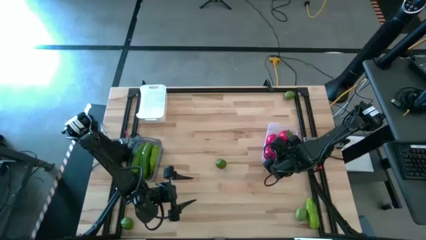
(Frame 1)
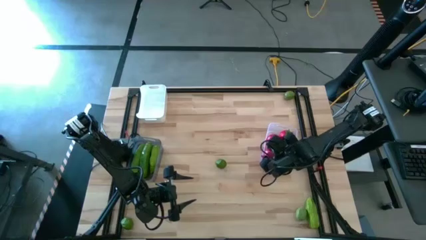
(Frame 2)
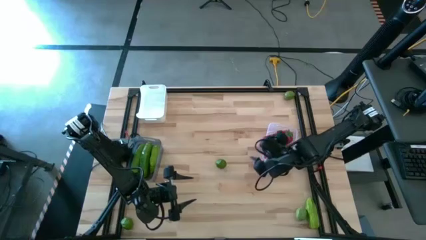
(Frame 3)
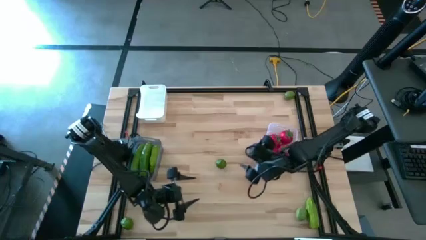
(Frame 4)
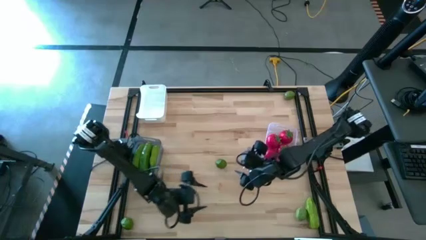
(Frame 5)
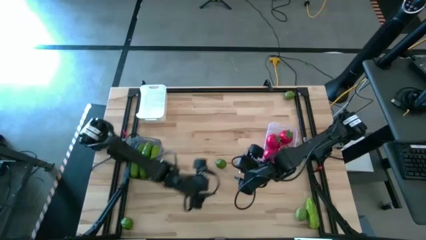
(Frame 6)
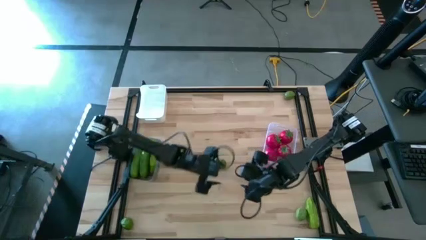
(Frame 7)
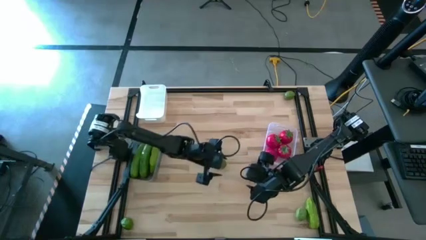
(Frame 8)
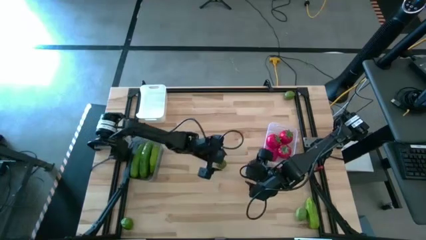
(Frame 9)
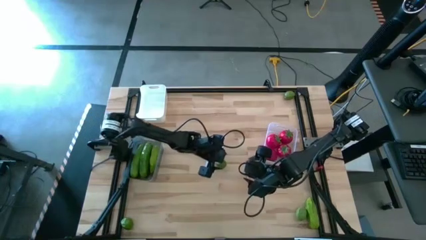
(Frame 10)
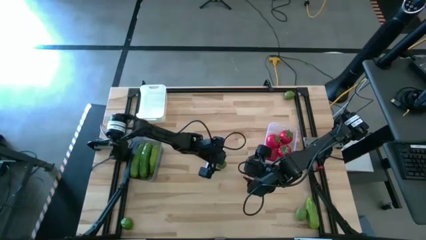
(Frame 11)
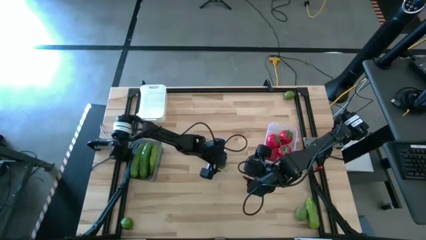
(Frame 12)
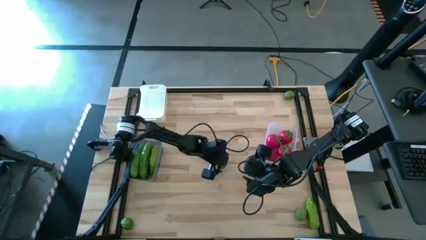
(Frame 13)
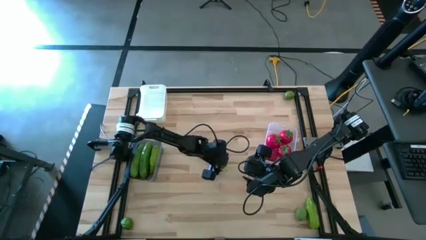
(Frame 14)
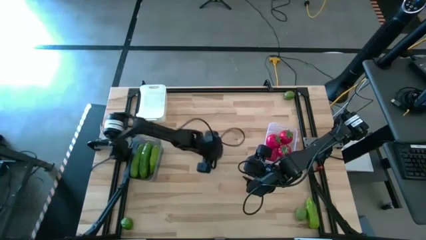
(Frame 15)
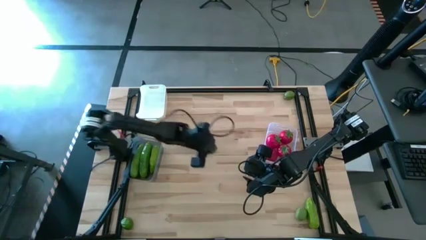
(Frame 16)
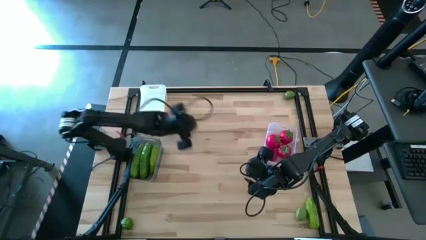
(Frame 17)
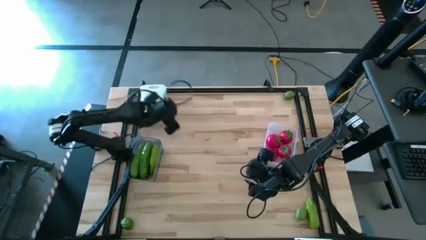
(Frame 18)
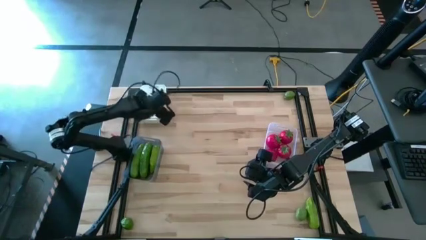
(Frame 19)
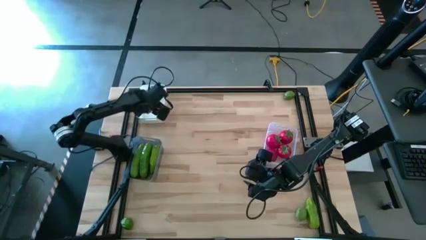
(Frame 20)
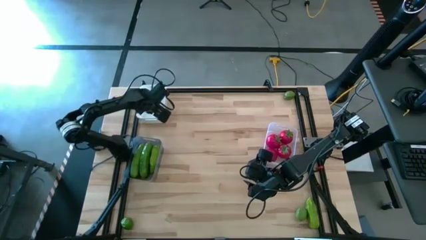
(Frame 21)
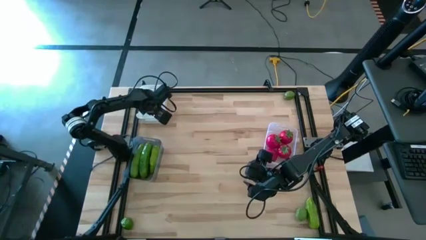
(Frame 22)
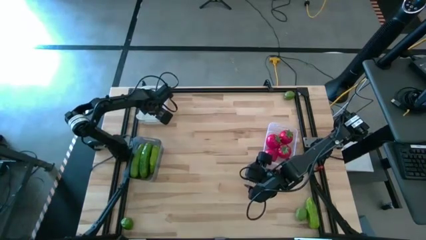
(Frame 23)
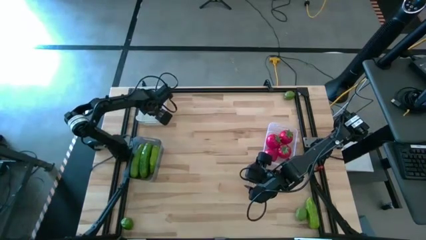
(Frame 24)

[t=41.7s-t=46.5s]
Task: Sort produce into baskets
Put the lime into the white bin

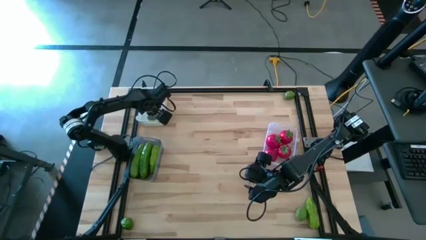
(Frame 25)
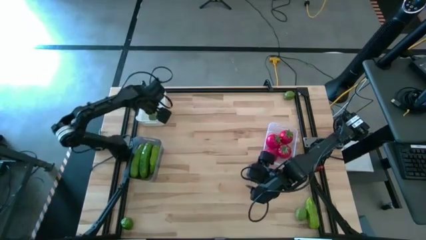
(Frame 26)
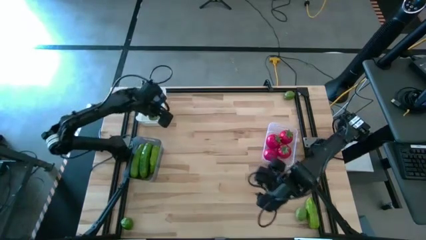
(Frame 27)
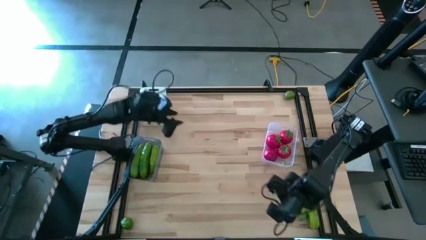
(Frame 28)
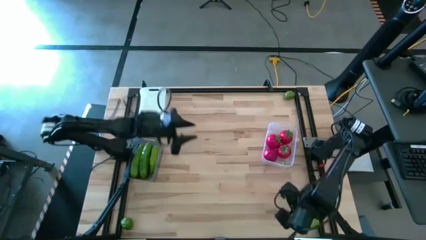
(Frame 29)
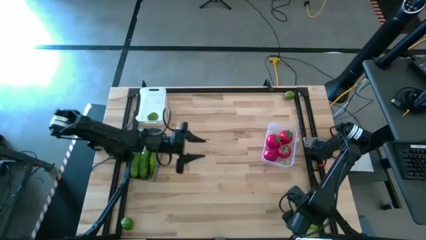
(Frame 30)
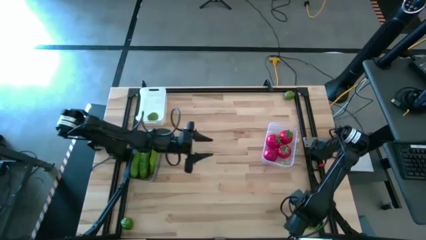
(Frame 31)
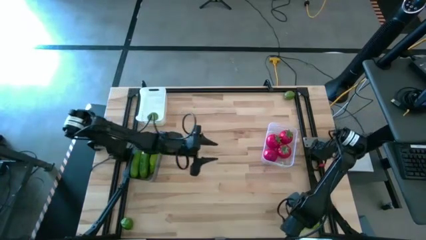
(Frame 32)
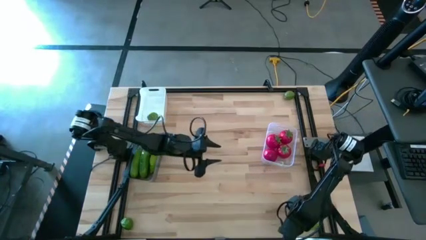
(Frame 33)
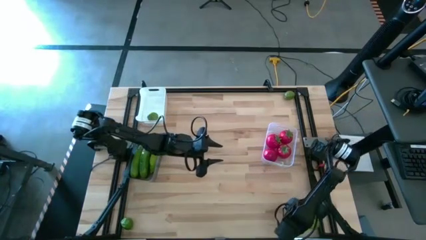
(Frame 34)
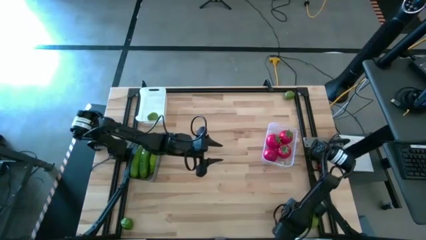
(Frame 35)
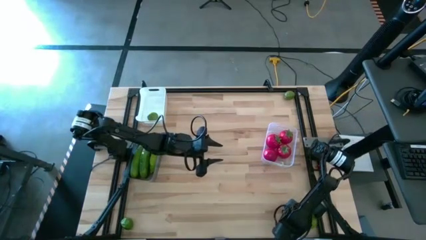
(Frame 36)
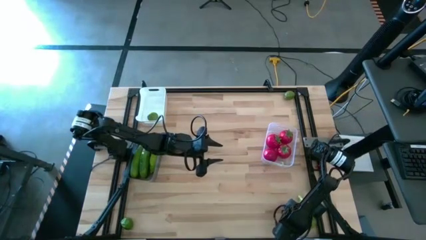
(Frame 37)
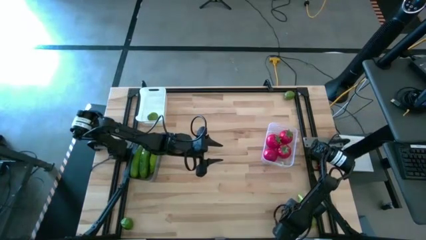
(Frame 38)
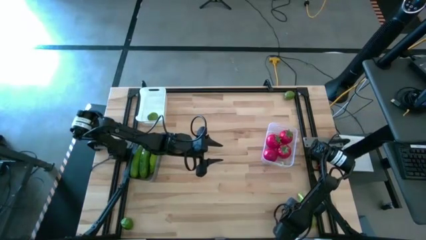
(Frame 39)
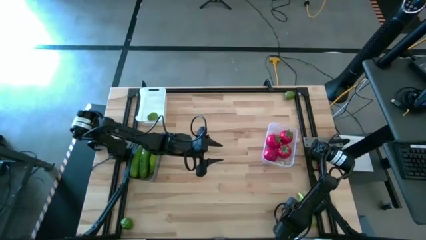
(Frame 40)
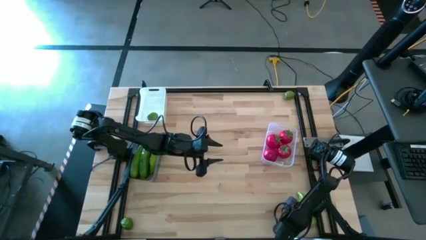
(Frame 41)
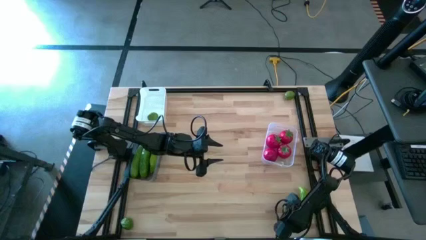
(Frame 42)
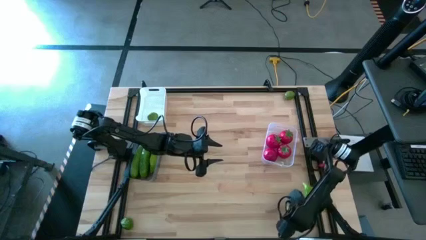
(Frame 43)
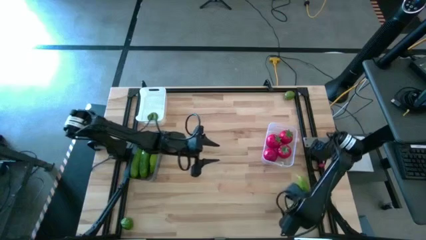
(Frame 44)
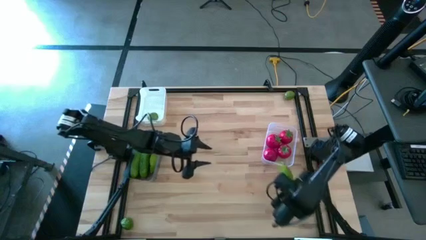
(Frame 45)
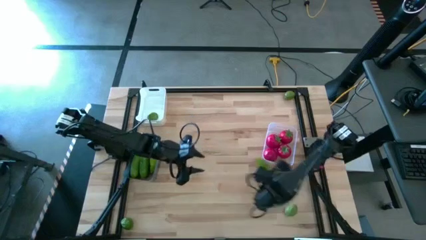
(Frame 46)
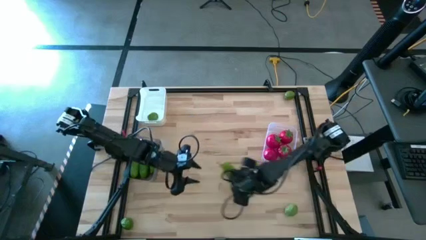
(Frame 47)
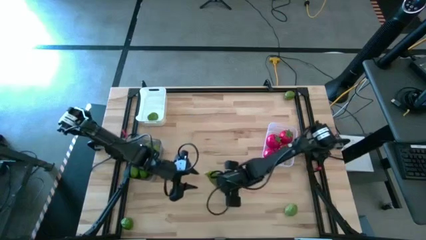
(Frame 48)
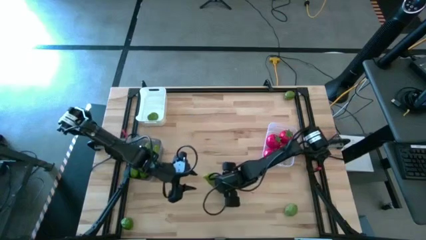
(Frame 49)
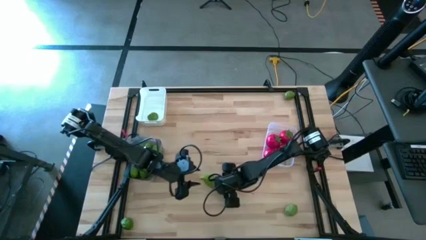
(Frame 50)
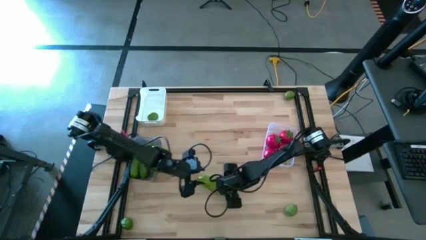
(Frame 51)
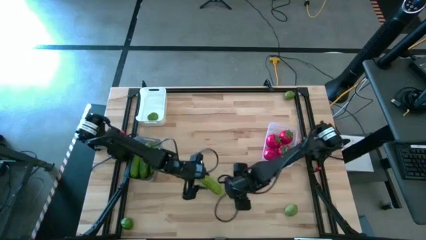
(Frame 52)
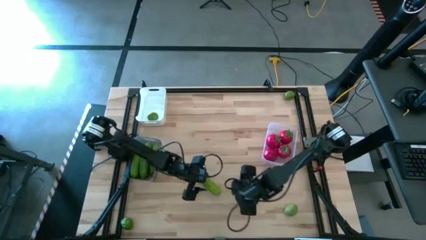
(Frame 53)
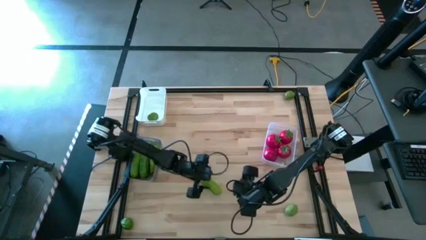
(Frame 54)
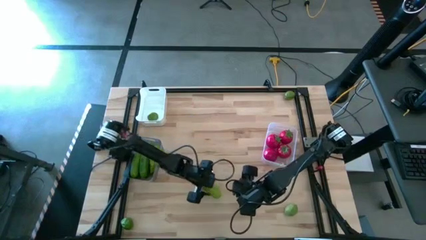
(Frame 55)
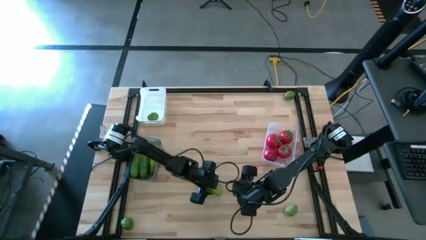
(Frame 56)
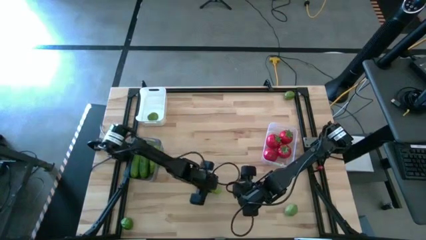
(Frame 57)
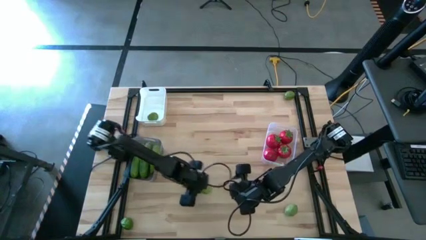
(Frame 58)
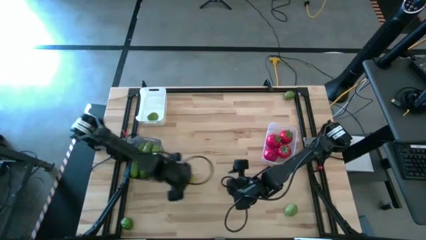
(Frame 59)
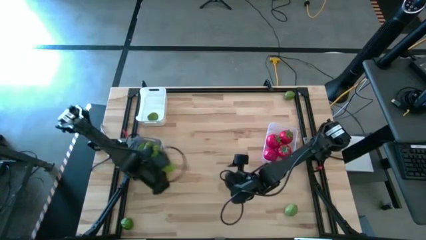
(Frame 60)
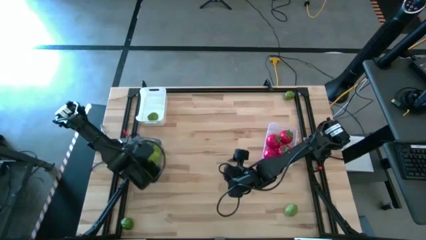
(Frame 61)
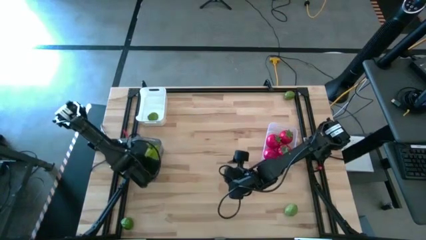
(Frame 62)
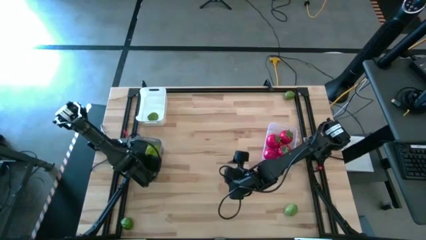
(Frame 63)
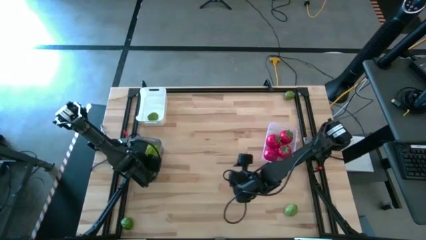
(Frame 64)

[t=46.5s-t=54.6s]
Put the cucumber into the black bin

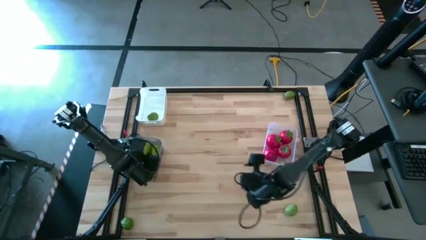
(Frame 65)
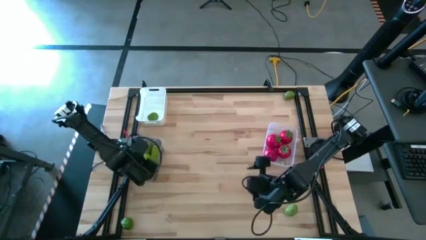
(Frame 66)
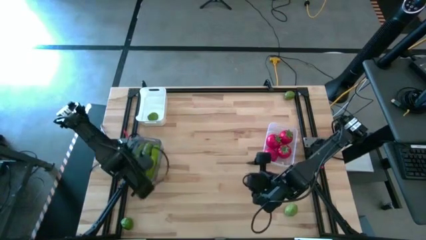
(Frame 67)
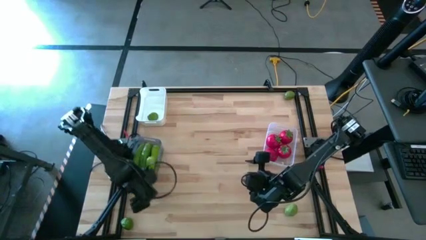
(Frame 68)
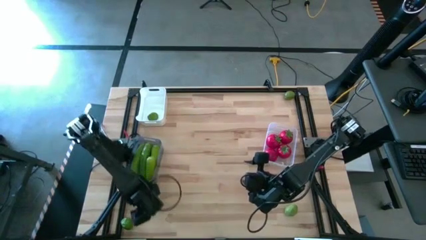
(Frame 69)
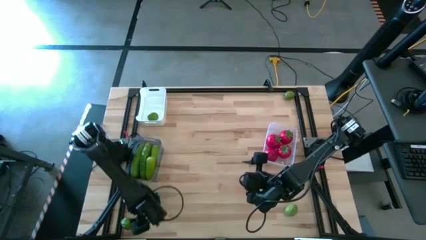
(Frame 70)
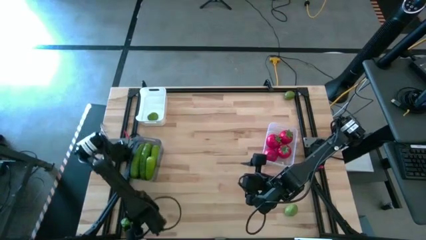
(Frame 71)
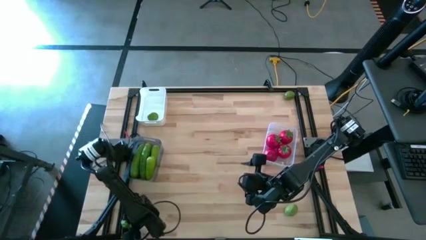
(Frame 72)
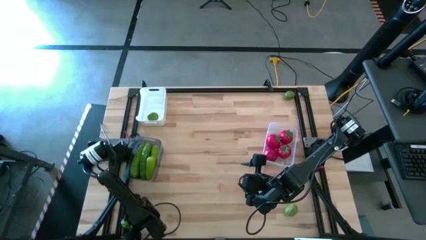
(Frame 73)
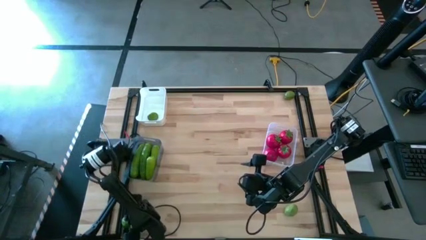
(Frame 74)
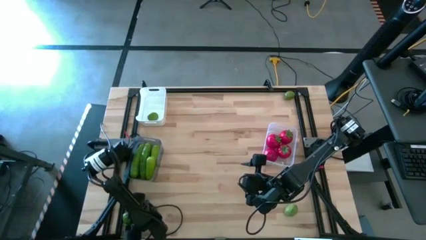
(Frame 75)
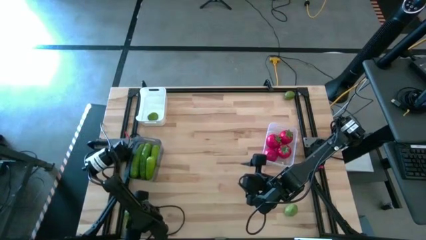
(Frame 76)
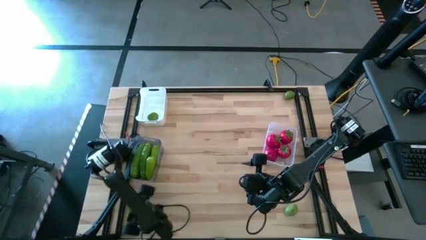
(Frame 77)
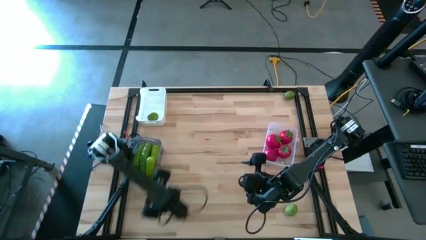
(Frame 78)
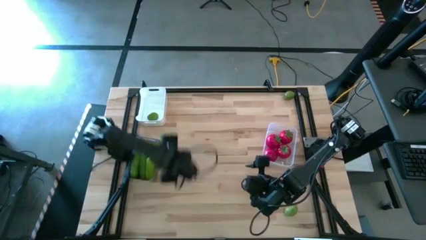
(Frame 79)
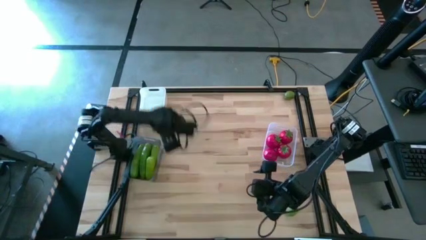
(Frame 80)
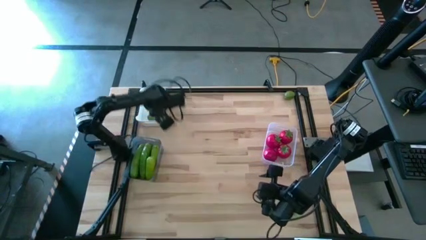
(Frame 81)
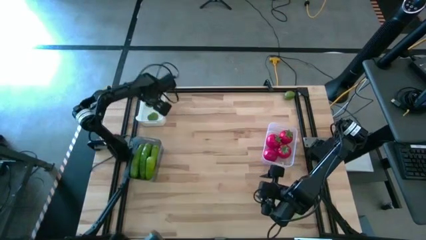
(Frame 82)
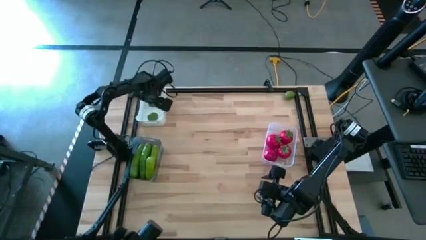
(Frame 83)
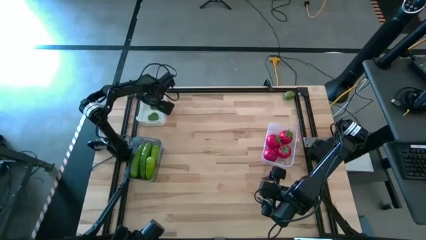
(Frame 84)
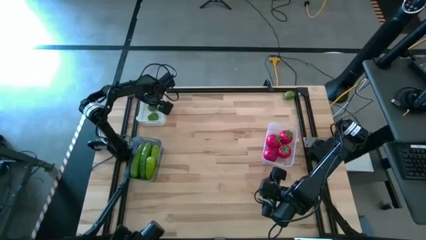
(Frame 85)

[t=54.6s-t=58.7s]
Put the lime into the white bin
